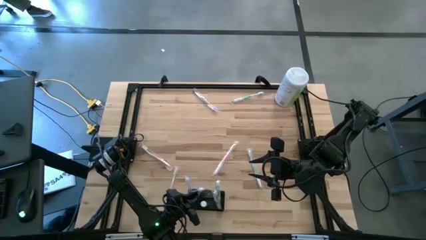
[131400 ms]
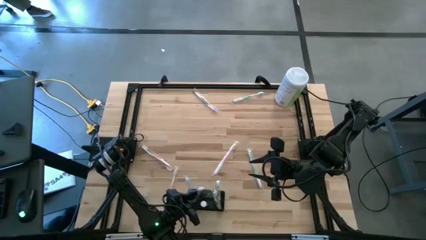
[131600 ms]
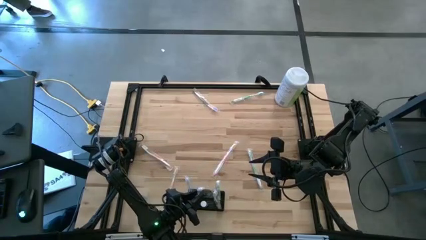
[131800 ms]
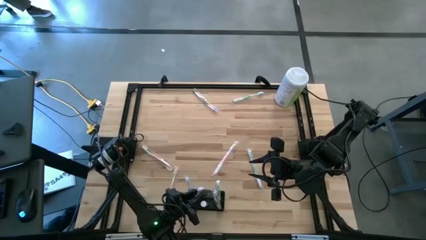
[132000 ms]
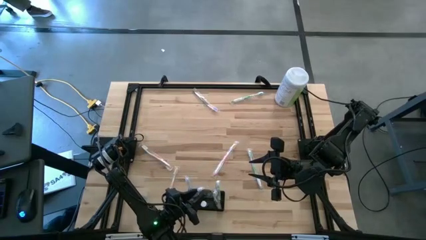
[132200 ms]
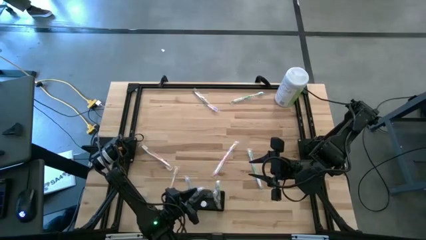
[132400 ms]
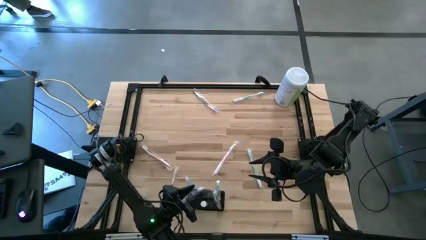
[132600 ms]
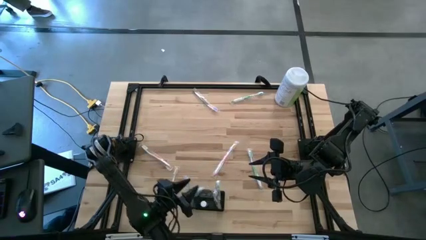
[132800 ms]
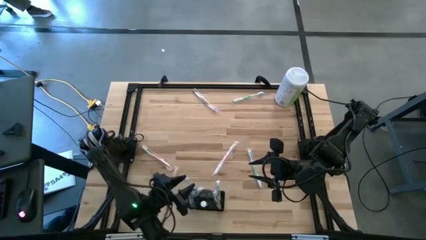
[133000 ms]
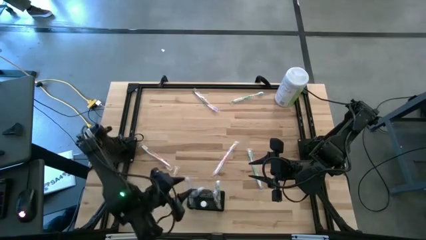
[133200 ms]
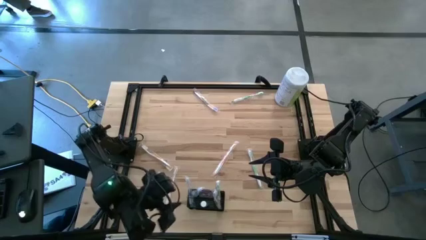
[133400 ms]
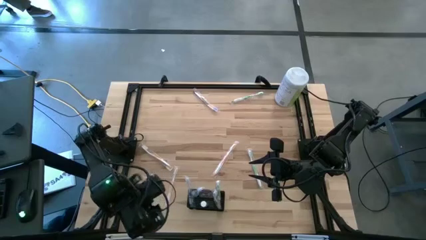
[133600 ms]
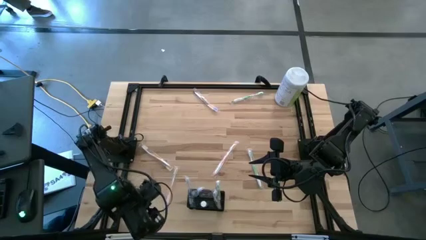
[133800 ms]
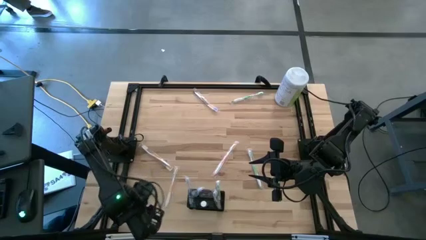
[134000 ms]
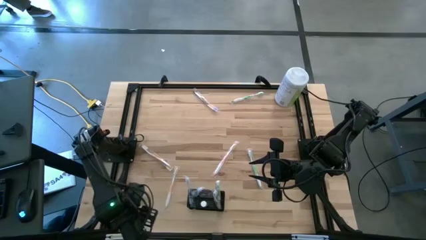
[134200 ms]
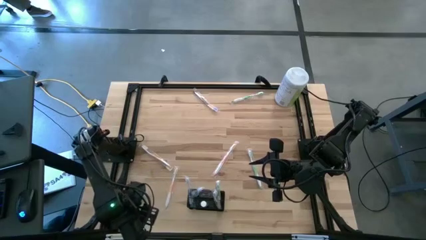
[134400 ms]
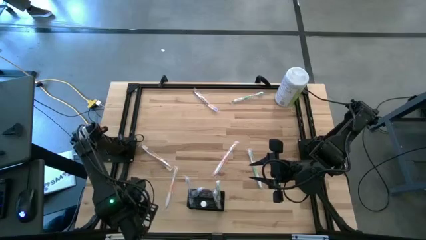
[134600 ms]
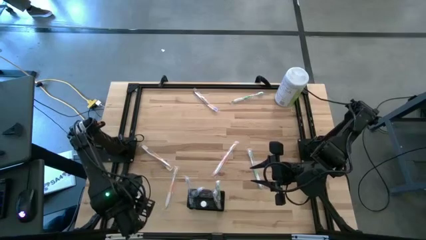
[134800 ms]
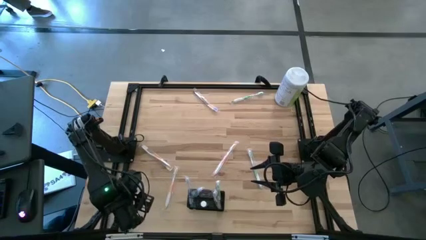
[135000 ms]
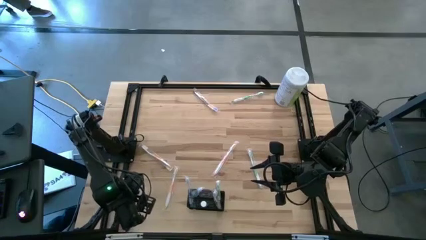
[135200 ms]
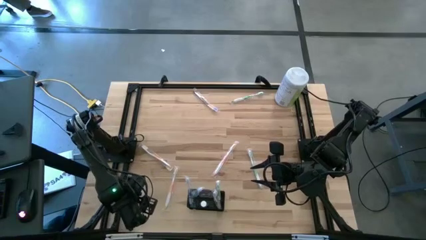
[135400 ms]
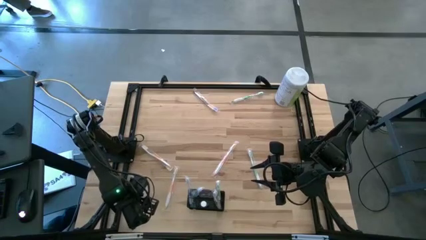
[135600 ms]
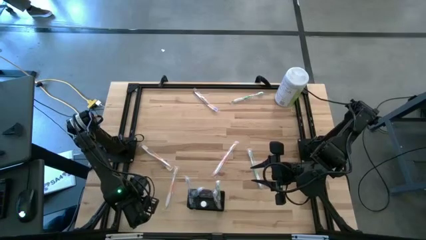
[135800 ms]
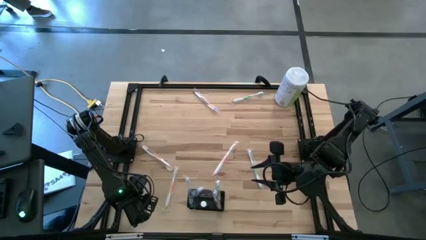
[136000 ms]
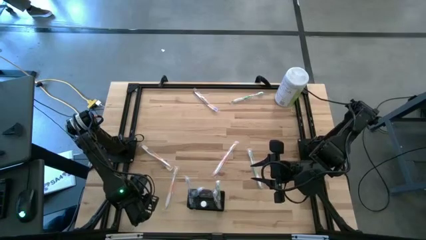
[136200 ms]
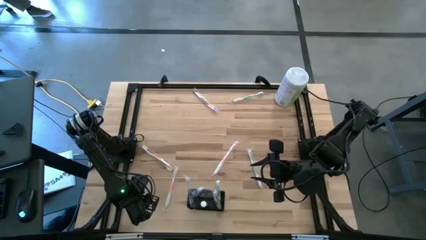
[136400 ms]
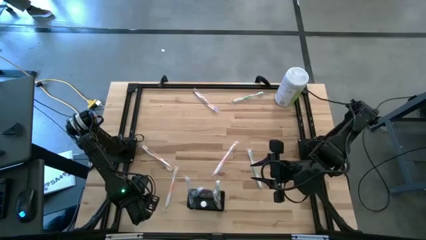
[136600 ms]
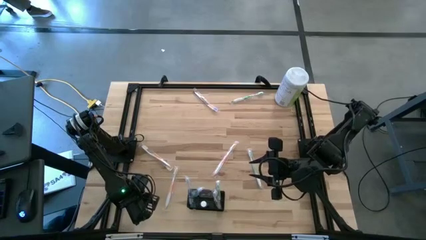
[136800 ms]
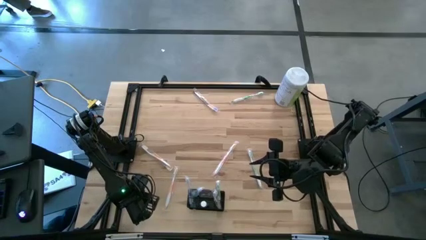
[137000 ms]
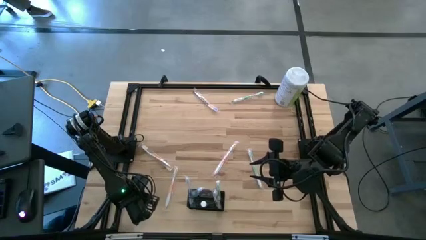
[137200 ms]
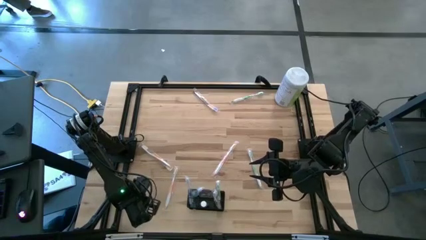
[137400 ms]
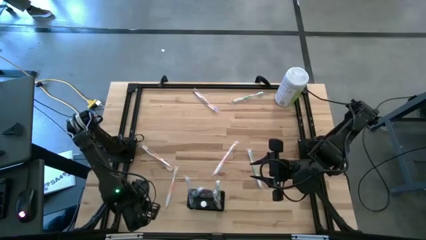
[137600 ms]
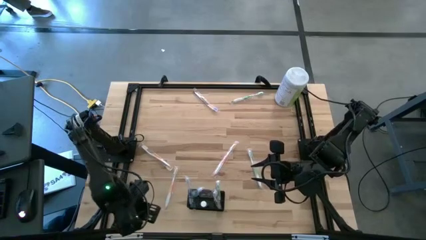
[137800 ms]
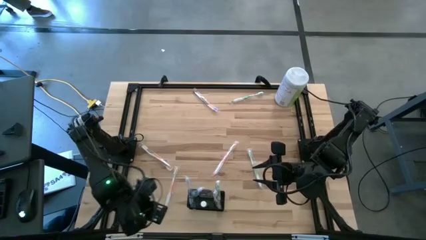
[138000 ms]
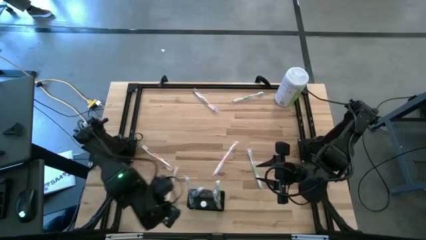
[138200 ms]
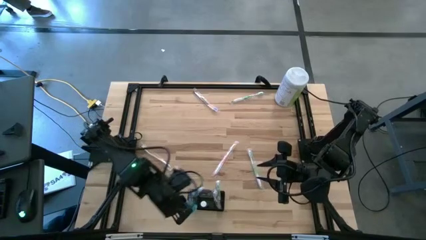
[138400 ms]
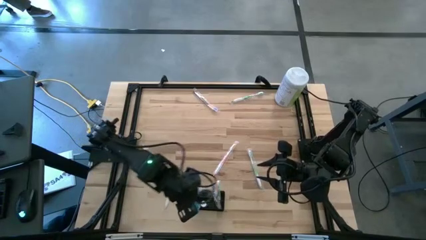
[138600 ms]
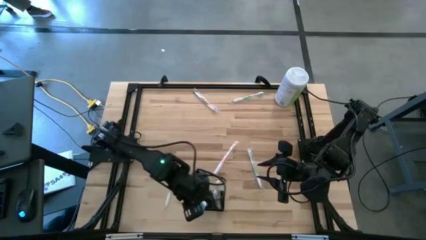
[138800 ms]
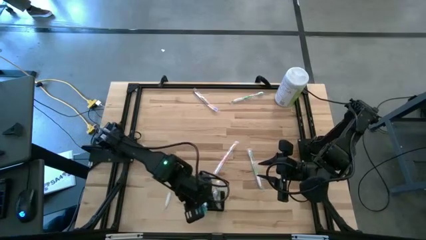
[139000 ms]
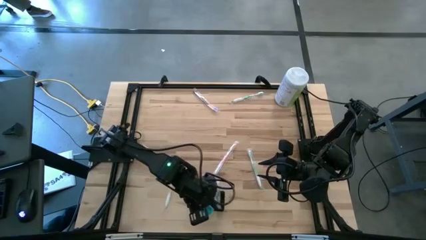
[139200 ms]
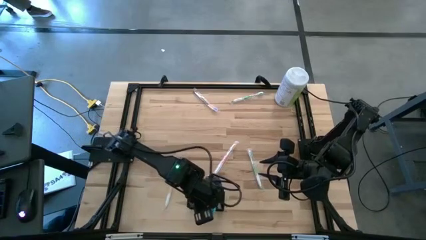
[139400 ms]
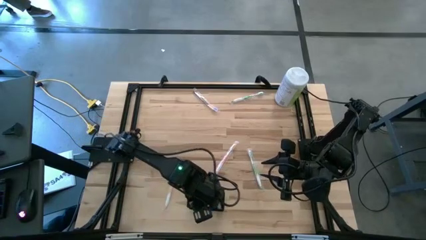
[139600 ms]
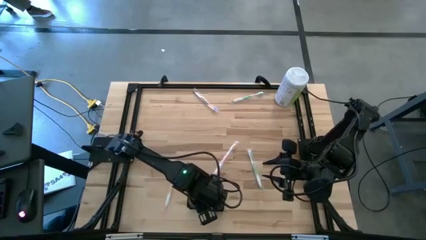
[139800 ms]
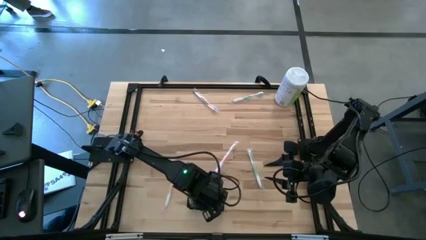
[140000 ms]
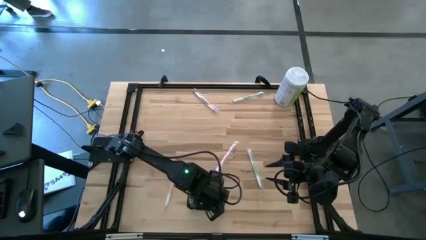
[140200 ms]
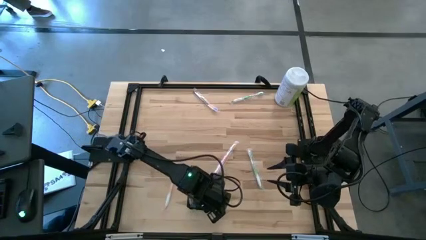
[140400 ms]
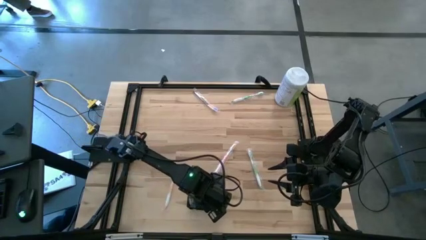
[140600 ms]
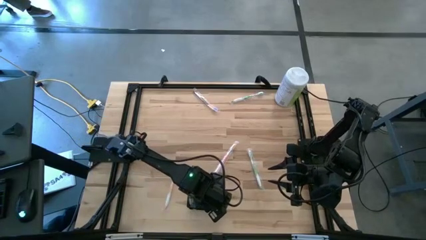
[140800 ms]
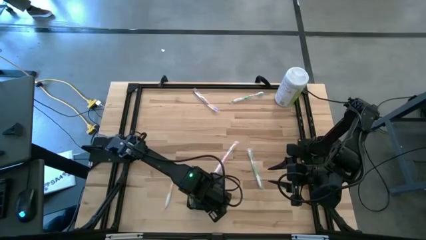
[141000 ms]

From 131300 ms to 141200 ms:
Task: Pick & Place toothbrushing station
Put the blue mouthwash into the black wire organizer

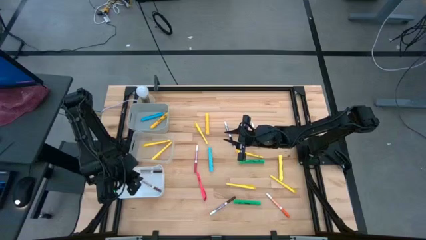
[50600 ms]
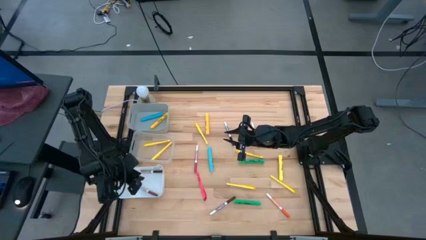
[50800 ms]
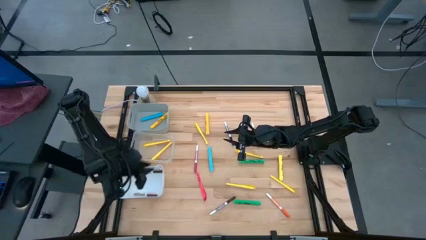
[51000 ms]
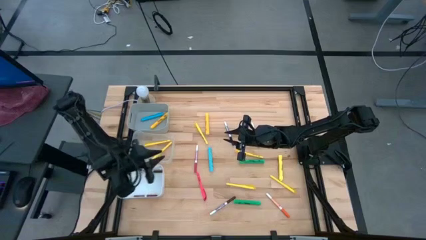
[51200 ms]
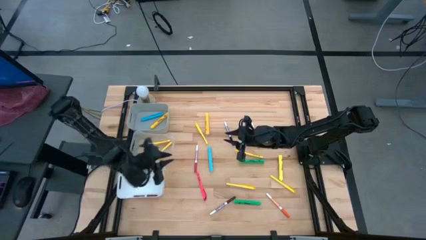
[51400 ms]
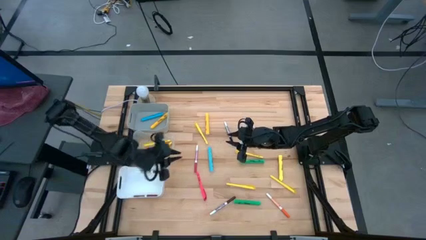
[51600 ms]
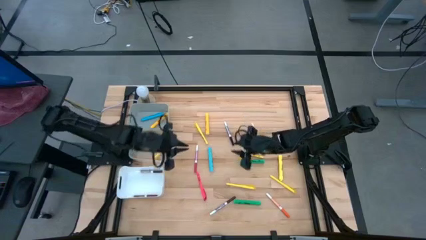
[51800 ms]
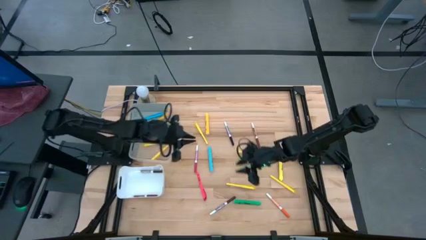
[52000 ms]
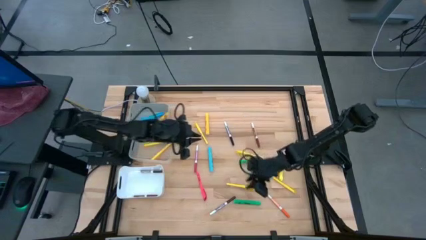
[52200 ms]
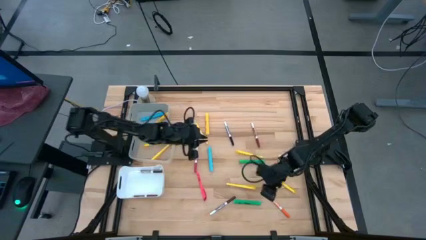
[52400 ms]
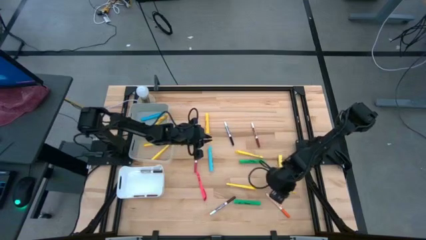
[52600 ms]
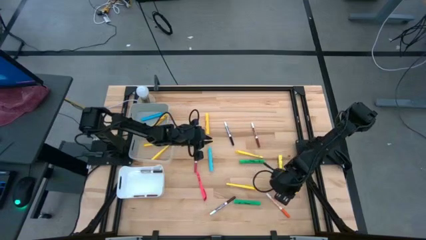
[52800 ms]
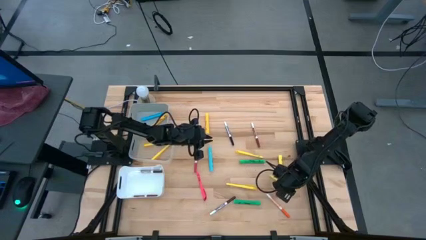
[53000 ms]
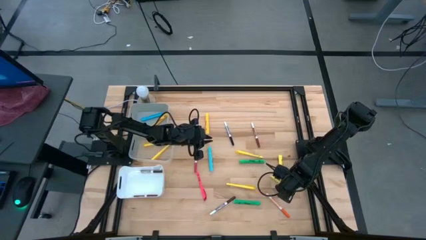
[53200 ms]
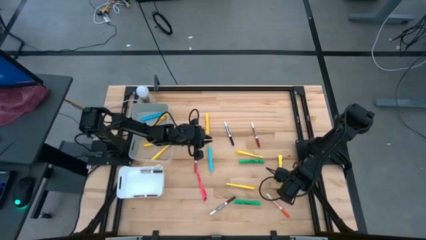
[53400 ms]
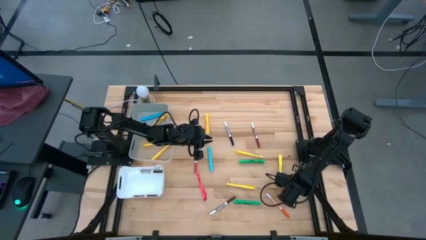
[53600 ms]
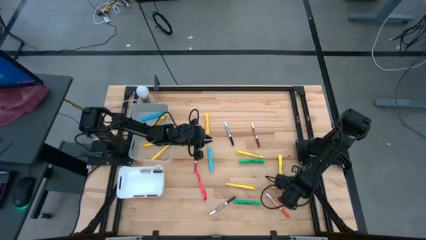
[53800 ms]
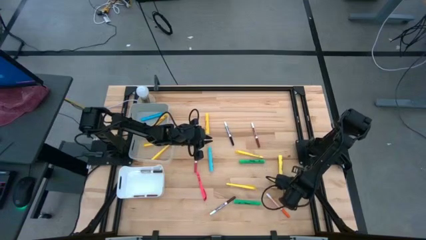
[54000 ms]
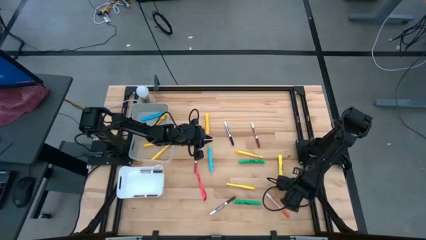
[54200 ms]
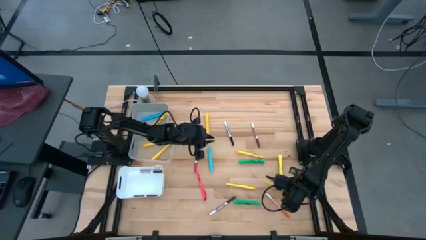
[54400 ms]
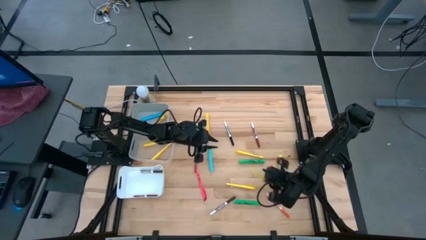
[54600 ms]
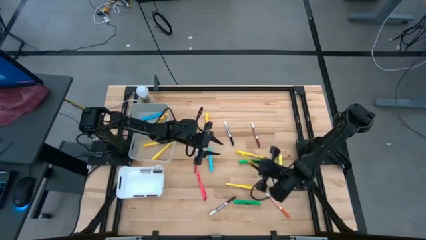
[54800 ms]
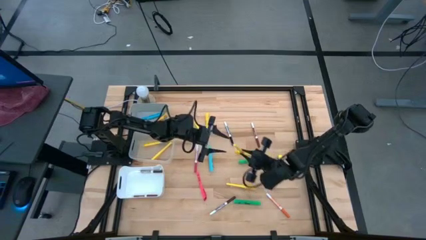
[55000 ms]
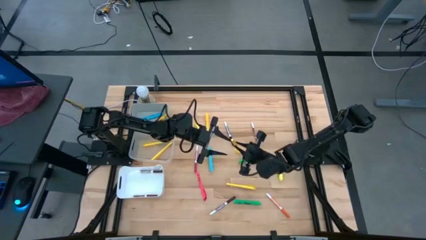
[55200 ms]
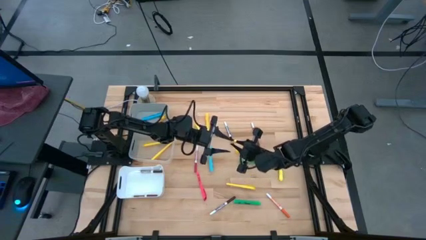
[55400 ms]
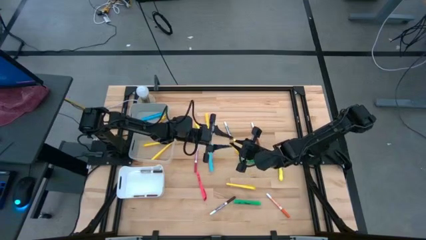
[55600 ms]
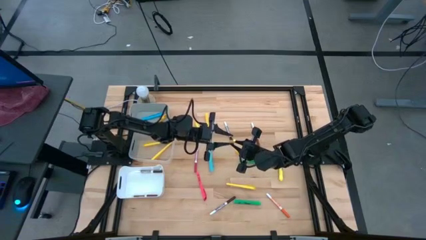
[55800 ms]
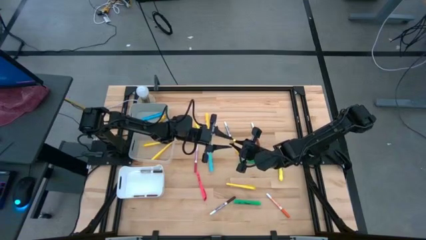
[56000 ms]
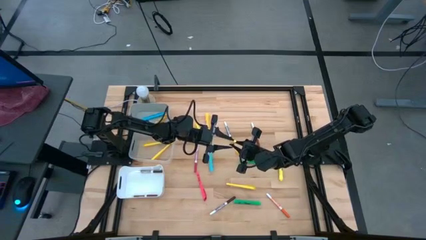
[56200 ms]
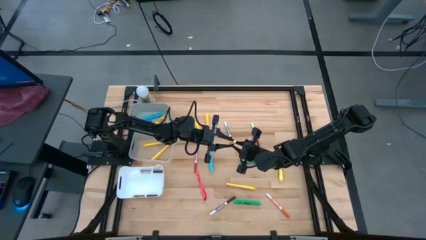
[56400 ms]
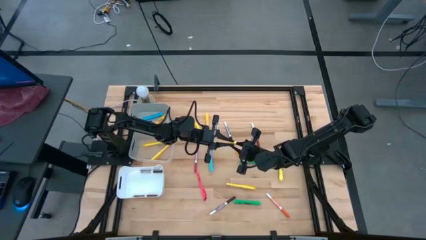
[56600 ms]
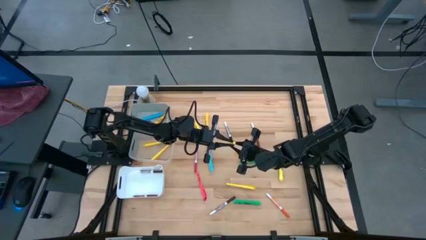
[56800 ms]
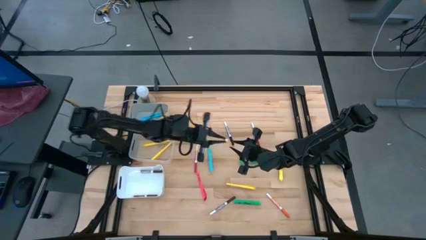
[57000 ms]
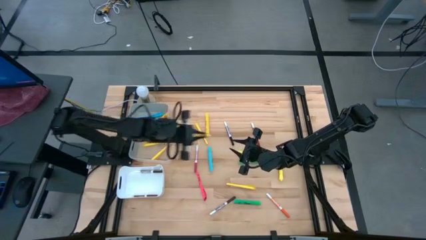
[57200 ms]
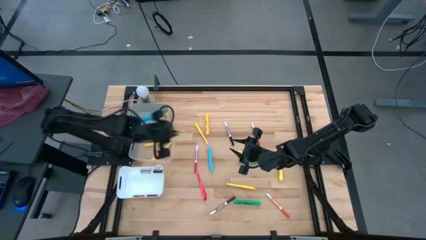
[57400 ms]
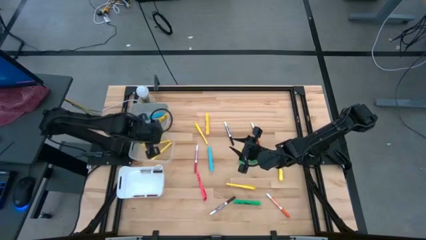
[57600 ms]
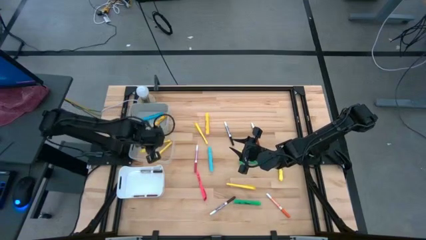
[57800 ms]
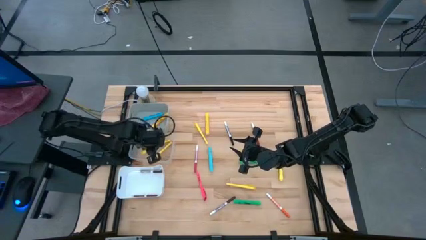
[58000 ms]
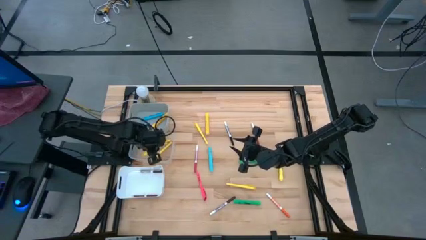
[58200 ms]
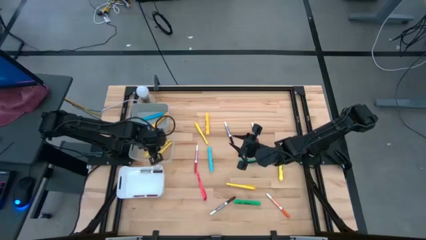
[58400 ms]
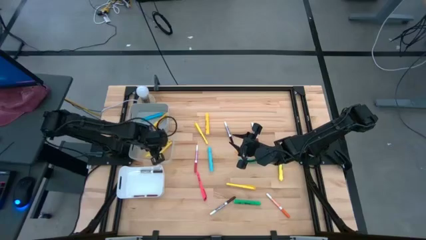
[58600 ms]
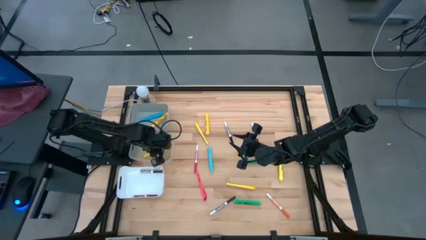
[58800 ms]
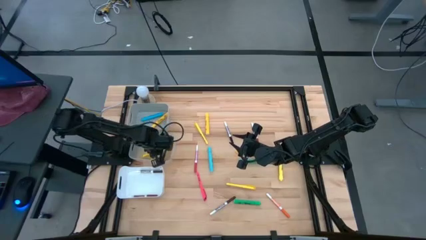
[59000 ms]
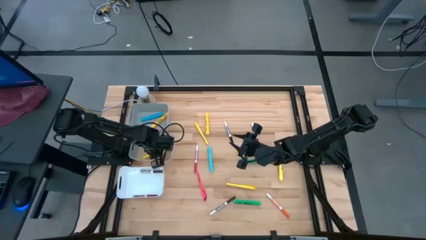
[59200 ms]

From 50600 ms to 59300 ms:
Task: Pick & Place Markers
Put the yellow pen into the transparent bin
